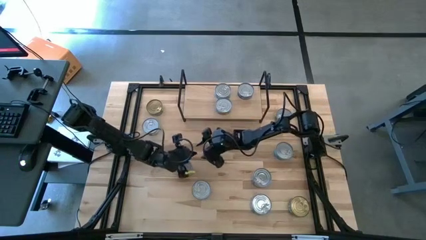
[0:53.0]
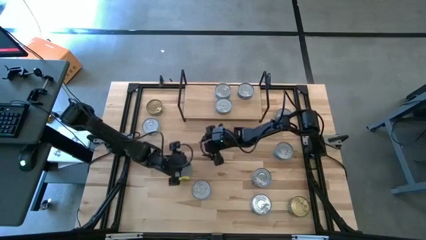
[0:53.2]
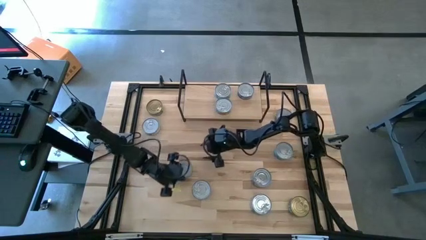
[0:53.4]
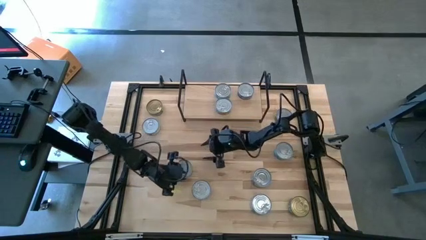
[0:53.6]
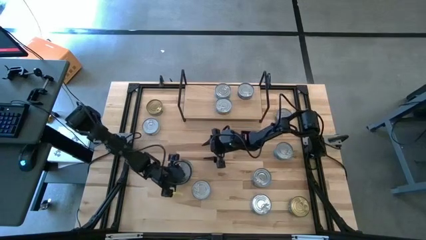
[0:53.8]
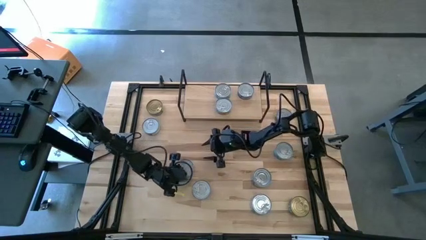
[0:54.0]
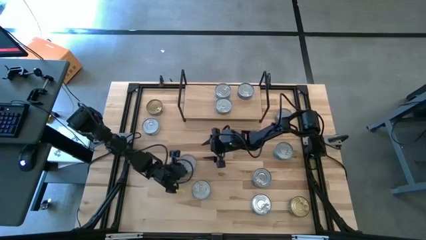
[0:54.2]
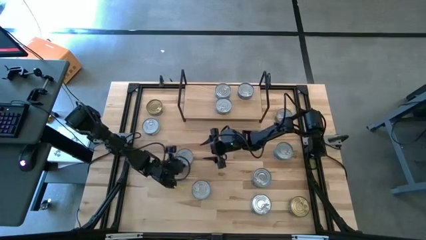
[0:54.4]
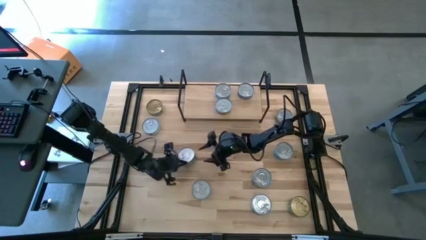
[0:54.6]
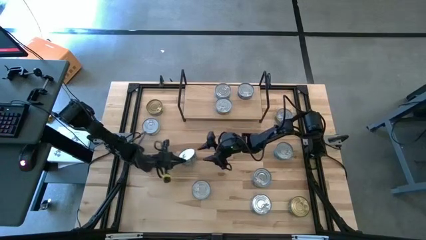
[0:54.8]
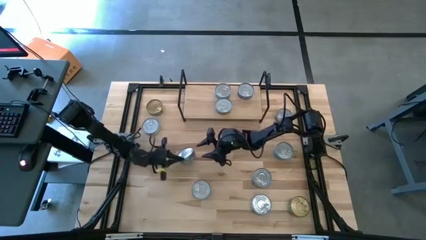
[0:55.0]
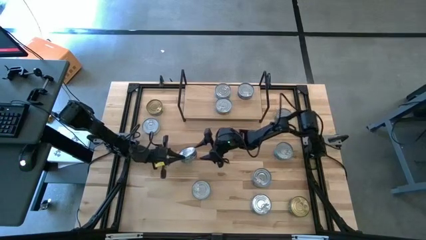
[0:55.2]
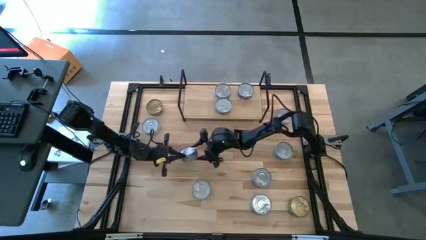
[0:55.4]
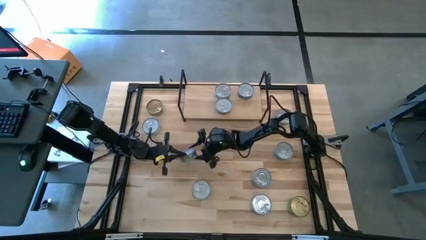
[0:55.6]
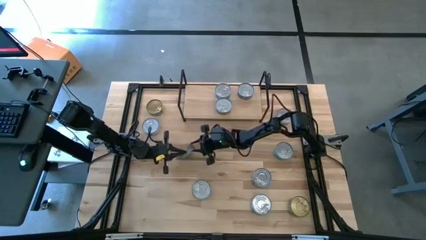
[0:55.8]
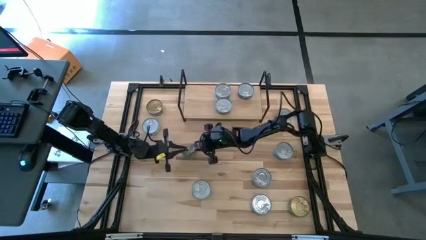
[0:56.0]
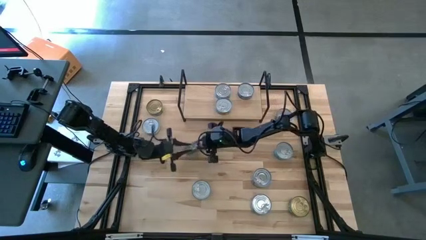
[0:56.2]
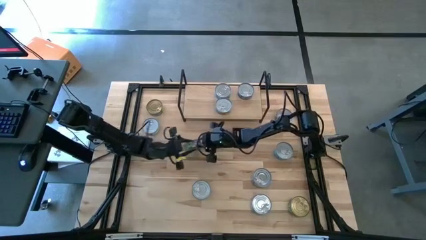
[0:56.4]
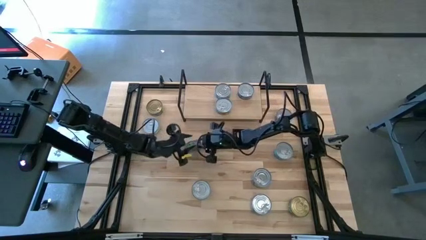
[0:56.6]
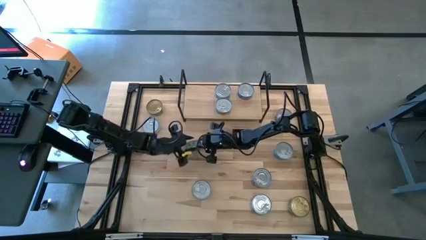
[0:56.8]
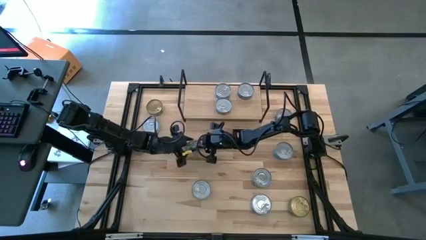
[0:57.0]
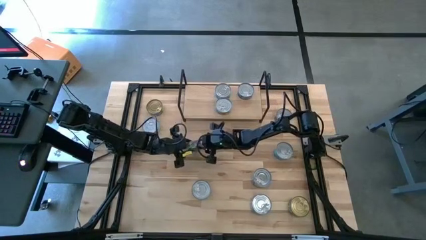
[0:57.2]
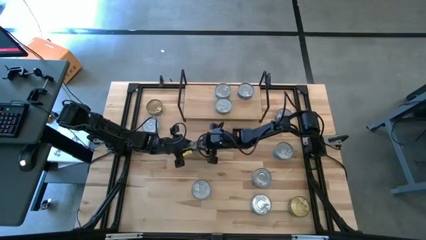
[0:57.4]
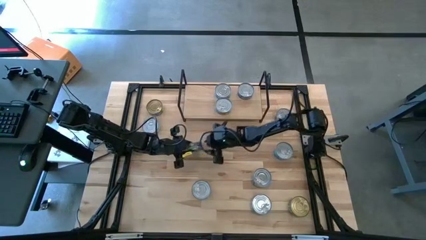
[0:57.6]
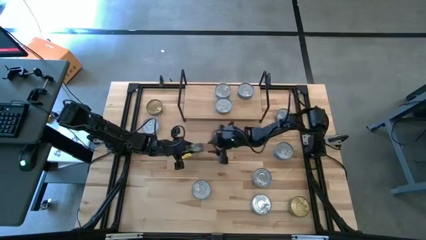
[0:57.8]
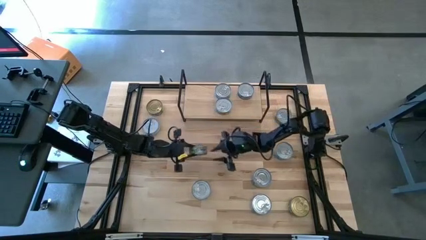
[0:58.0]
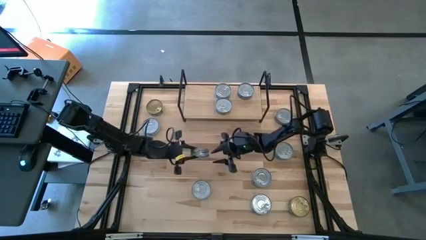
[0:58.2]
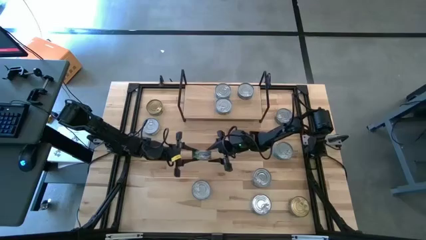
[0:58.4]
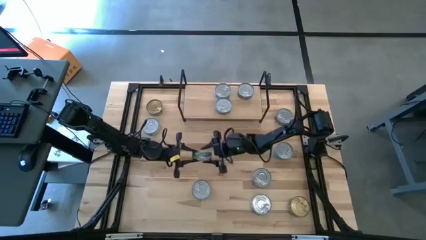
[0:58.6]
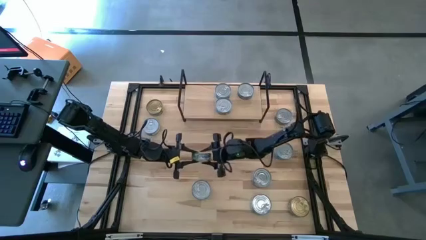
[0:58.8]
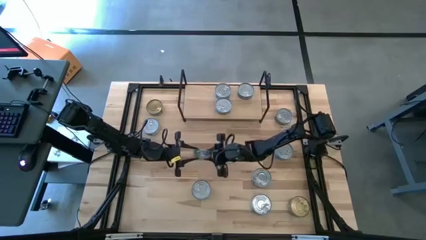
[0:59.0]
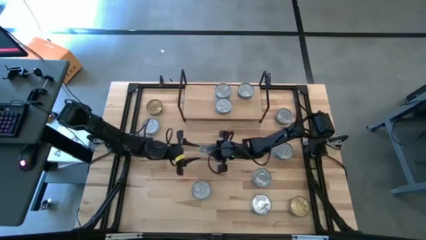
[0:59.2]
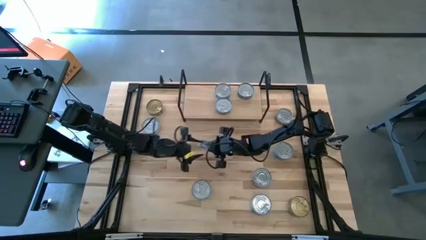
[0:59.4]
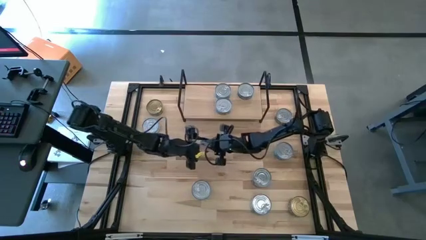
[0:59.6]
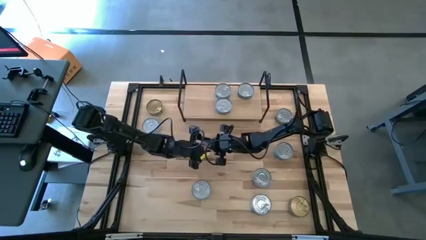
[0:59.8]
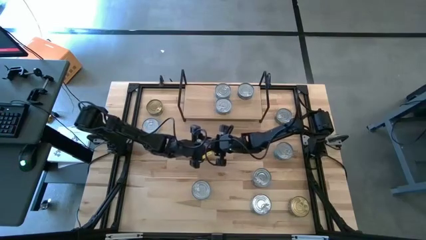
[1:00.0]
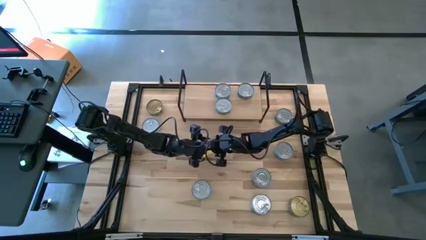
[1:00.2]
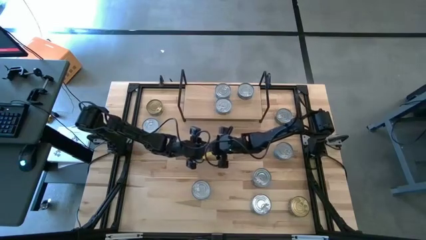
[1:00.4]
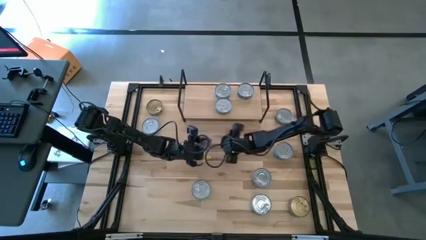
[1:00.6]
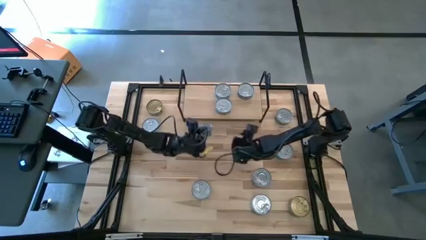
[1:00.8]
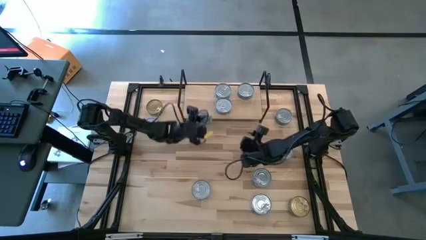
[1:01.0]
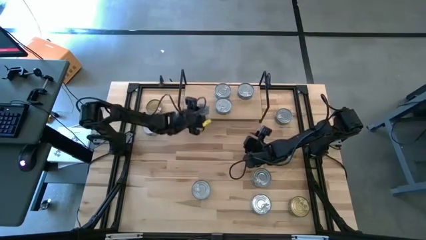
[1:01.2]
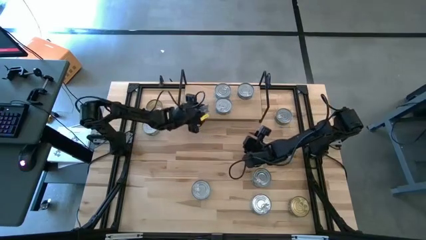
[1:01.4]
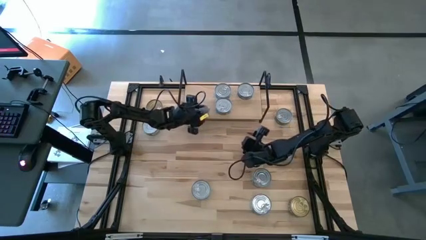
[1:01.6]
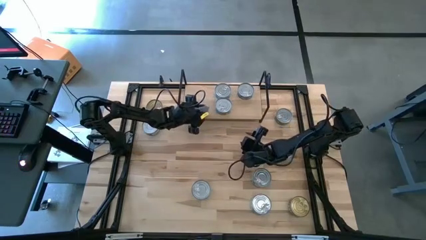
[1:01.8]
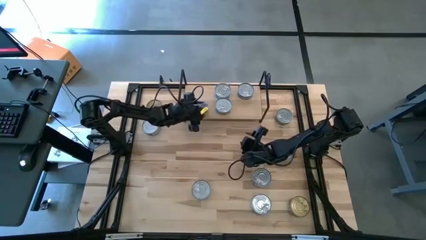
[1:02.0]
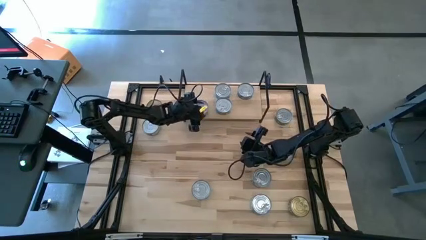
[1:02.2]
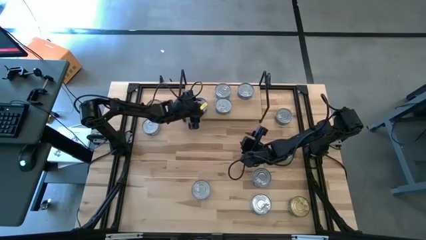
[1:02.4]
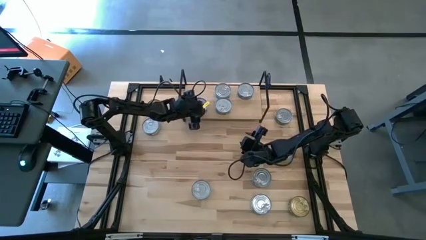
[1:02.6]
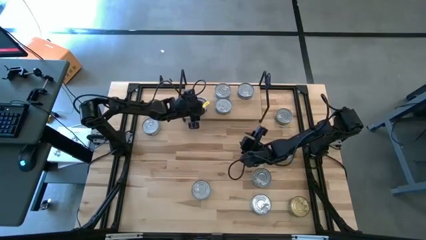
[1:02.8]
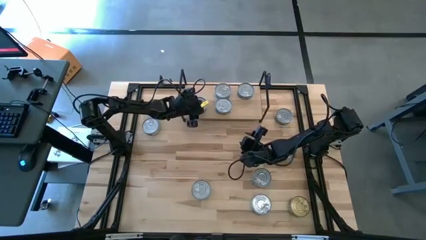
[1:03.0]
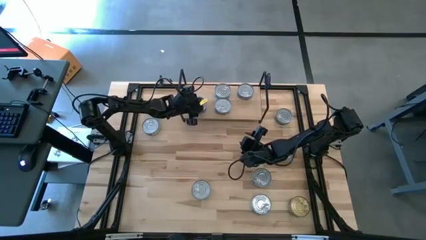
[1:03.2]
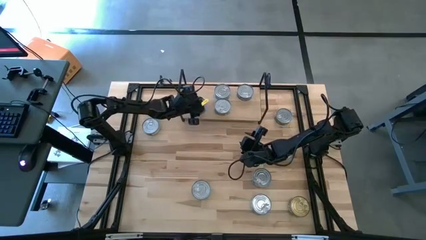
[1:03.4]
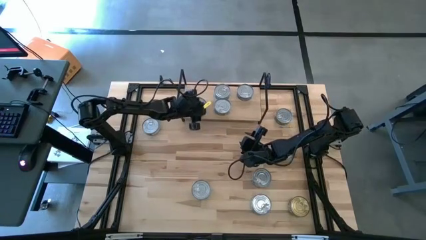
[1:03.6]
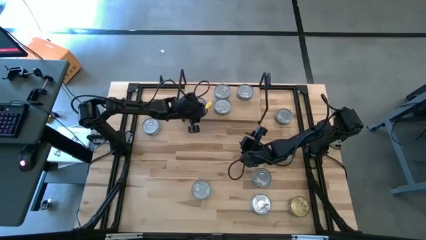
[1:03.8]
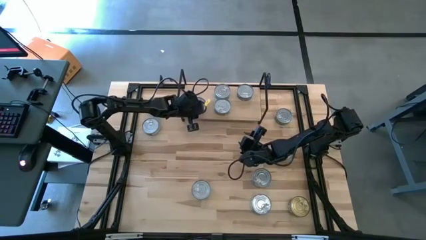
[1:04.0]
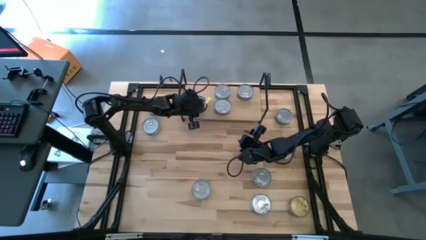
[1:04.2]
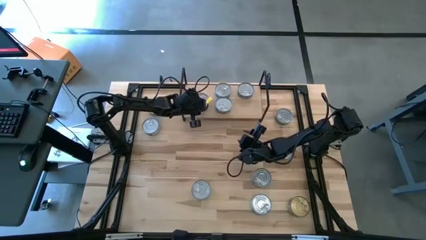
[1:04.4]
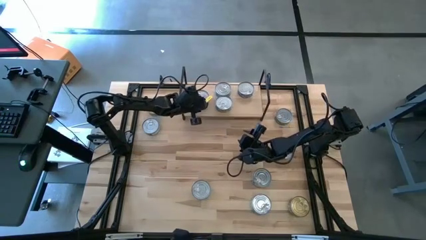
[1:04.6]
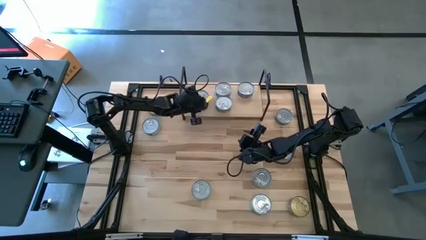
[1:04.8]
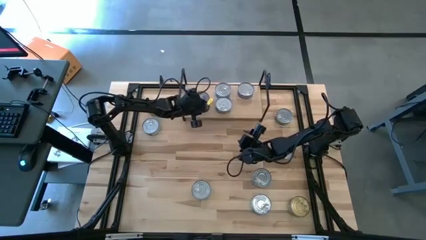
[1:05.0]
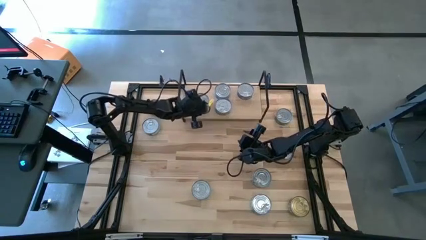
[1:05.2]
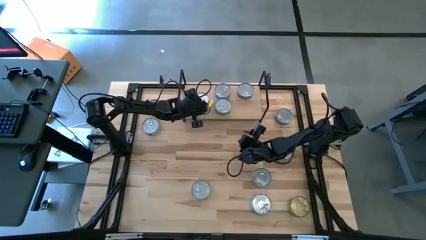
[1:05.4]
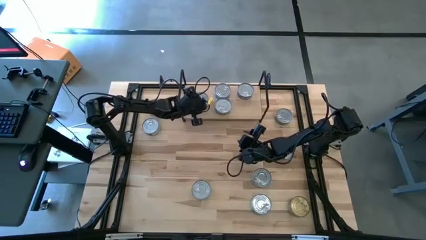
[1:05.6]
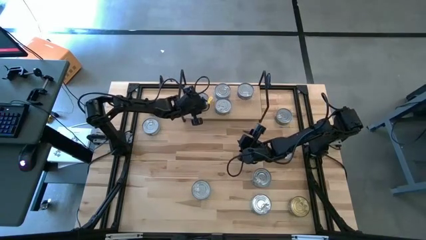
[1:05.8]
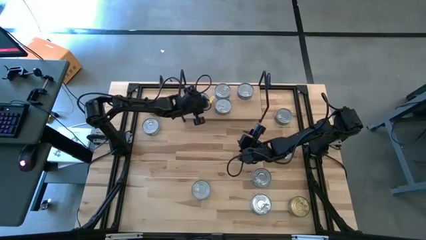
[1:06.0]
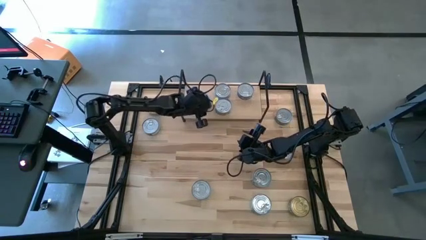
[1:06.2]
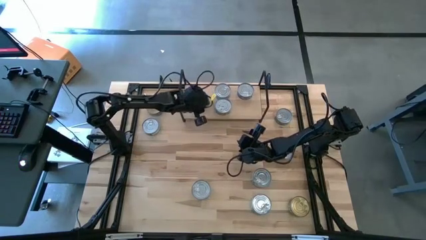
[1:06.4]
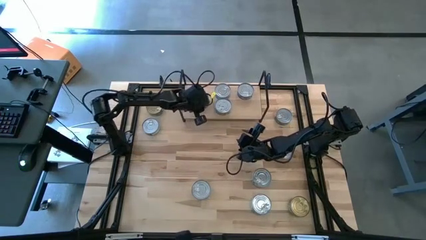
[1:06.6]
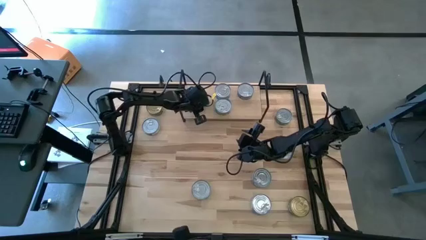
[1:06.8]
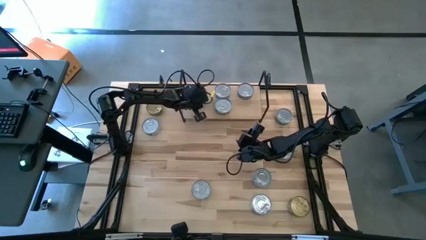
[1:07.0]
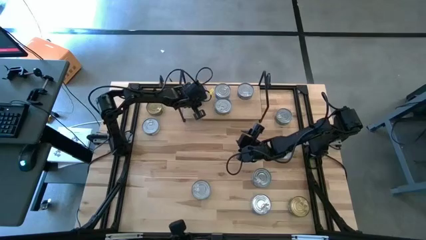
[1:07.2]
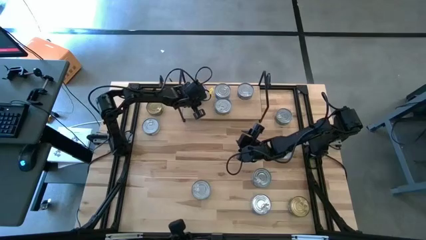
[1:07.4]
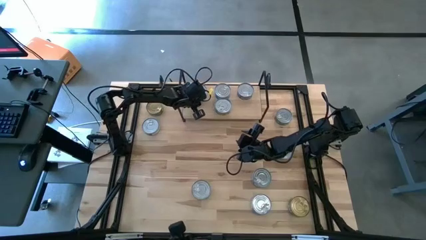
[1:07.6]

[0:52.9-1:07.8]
Task: Stack canned seafood by type on shelf
Put the green tuna can on the shelf
